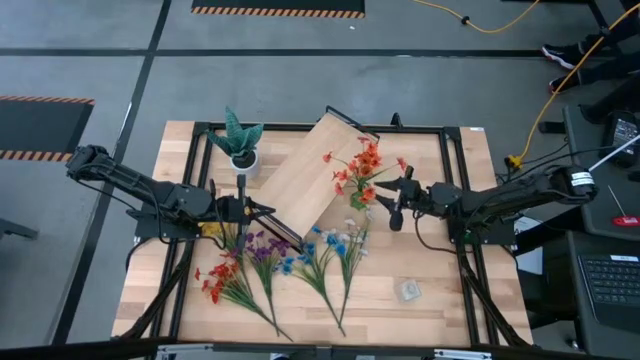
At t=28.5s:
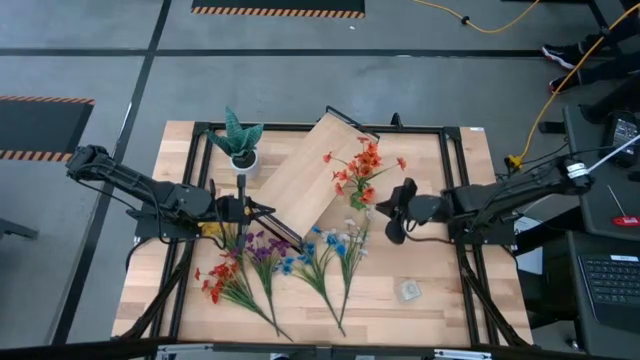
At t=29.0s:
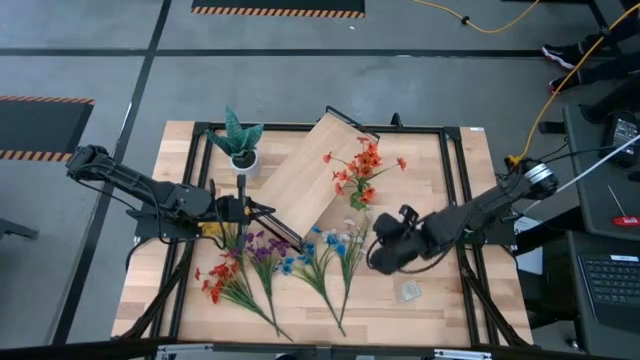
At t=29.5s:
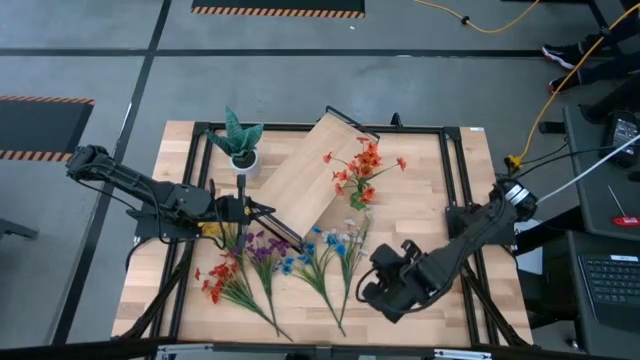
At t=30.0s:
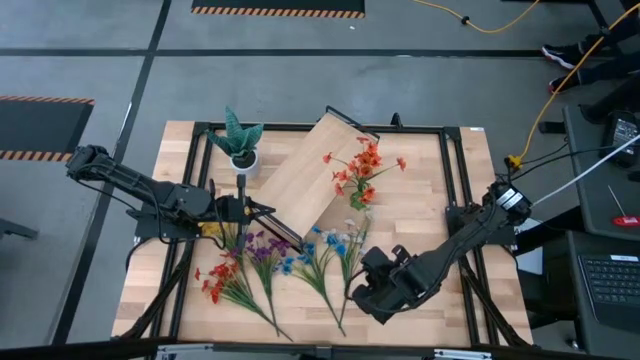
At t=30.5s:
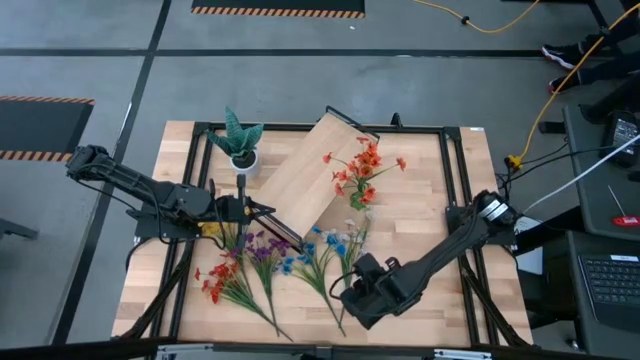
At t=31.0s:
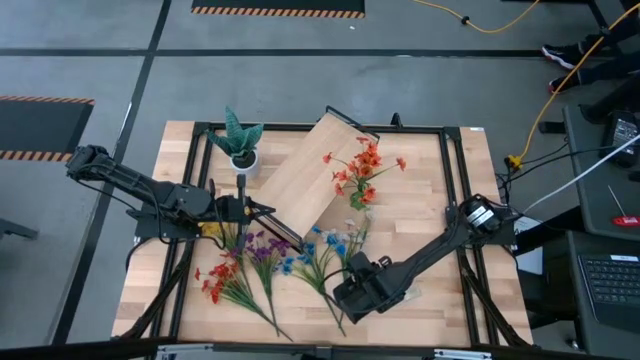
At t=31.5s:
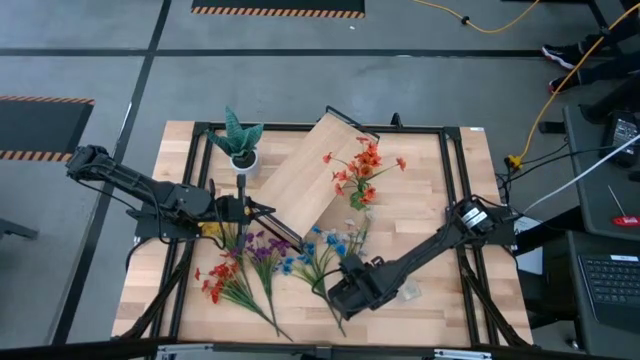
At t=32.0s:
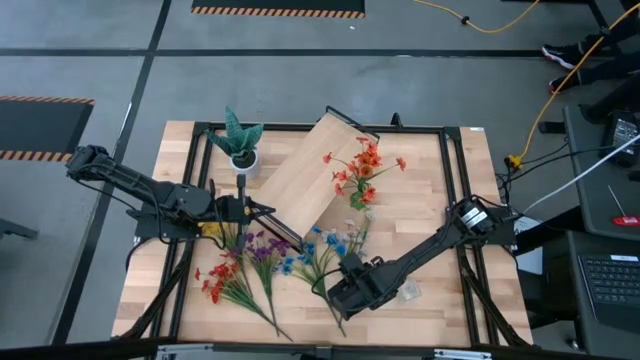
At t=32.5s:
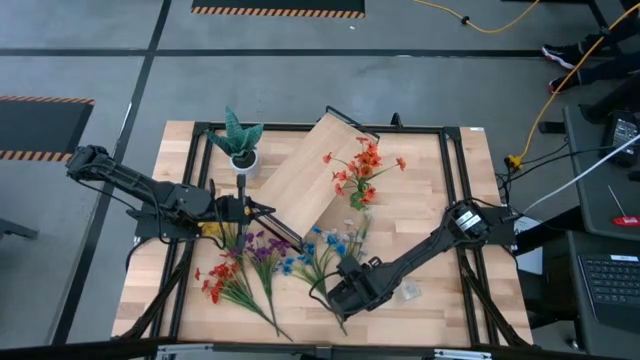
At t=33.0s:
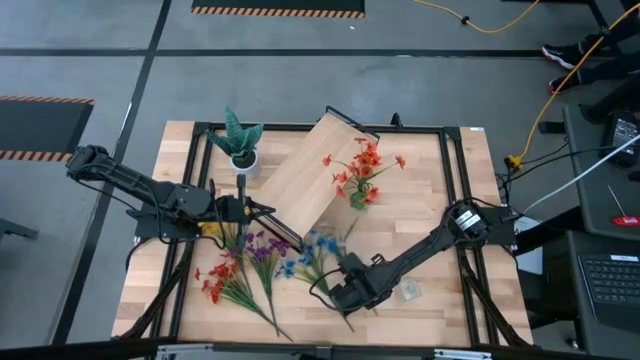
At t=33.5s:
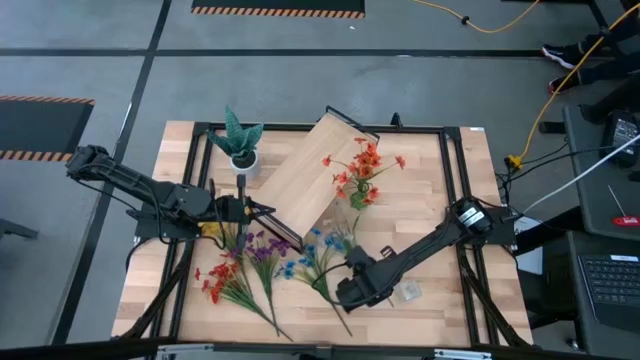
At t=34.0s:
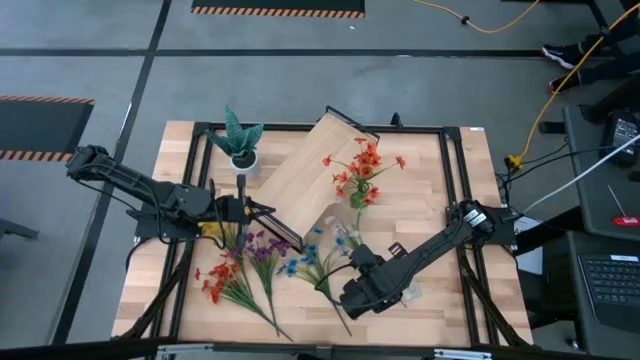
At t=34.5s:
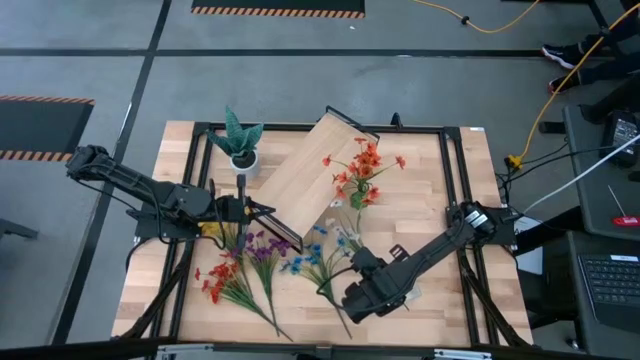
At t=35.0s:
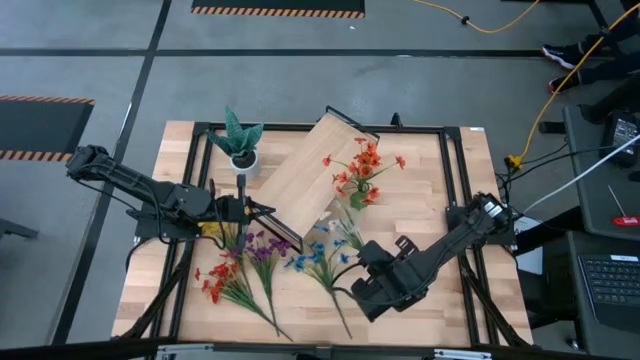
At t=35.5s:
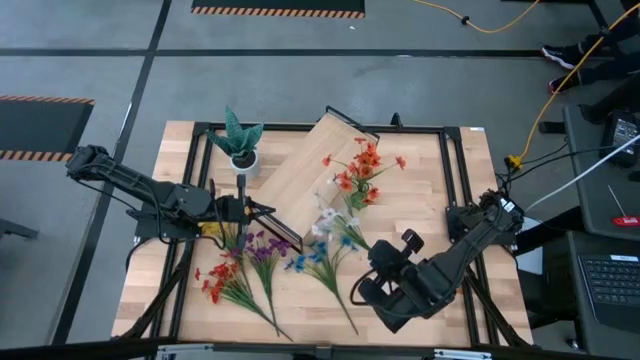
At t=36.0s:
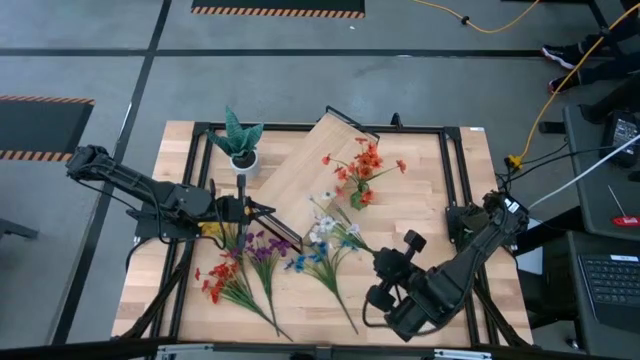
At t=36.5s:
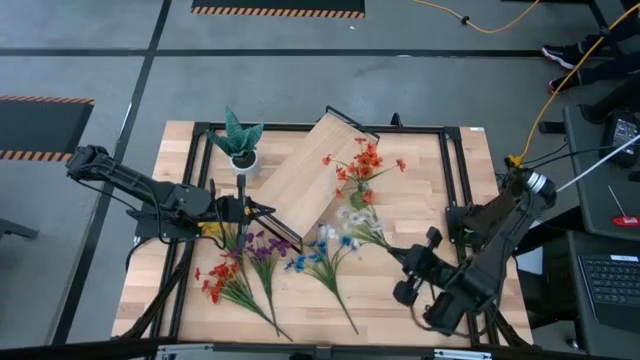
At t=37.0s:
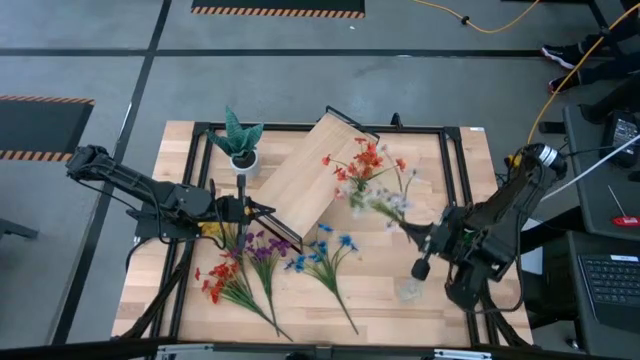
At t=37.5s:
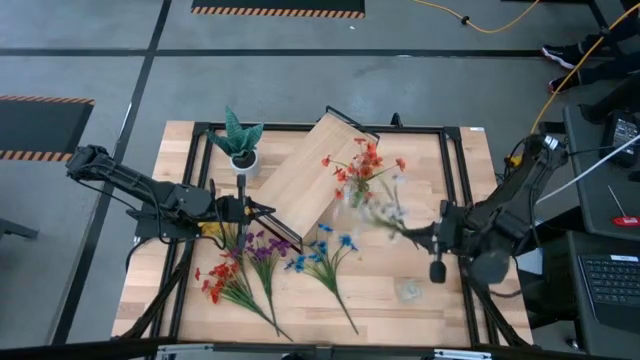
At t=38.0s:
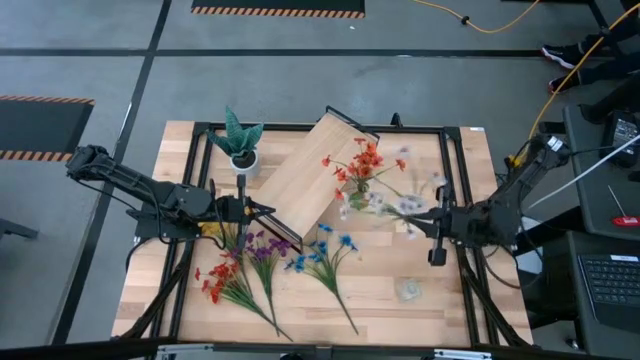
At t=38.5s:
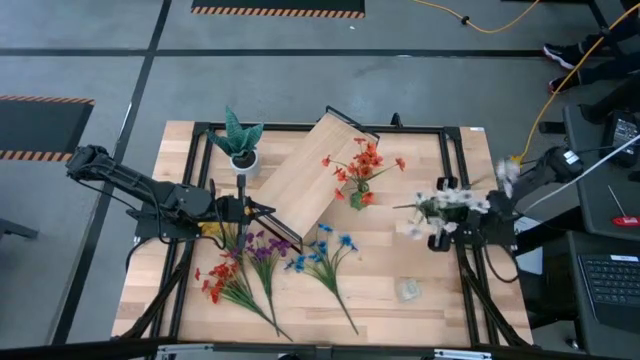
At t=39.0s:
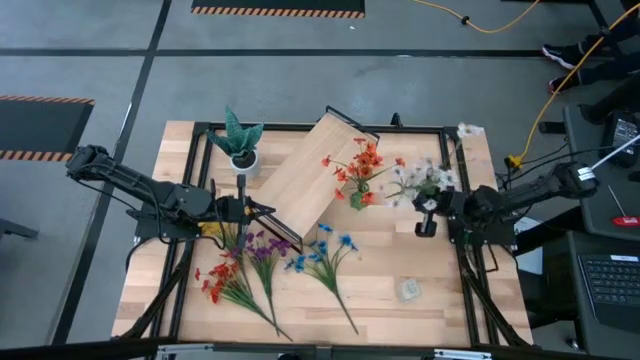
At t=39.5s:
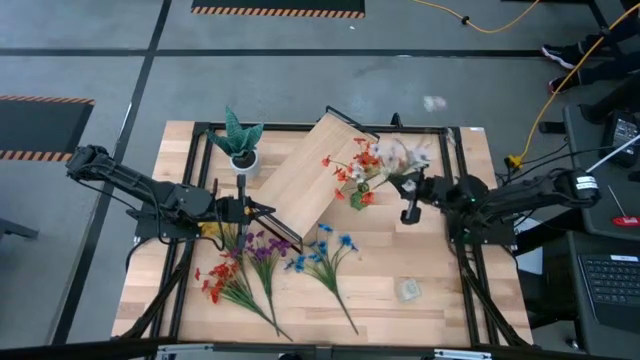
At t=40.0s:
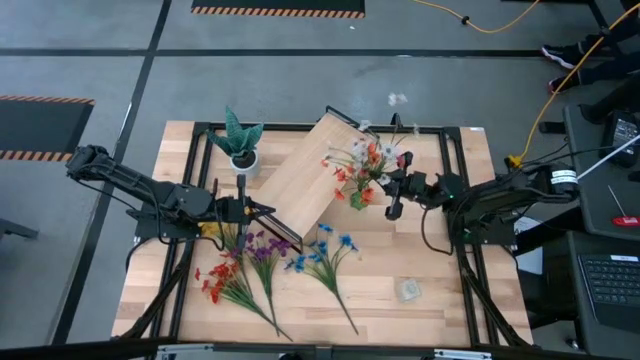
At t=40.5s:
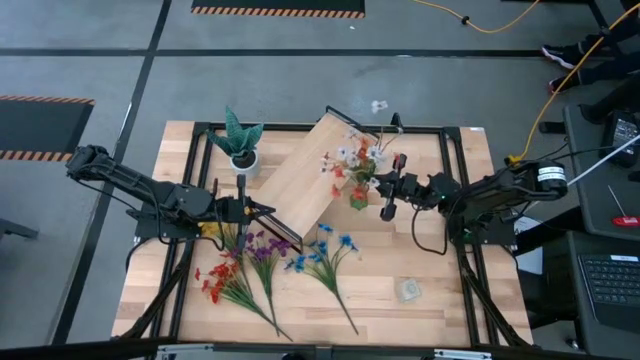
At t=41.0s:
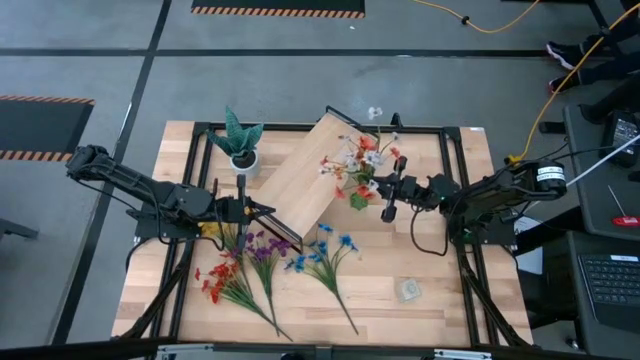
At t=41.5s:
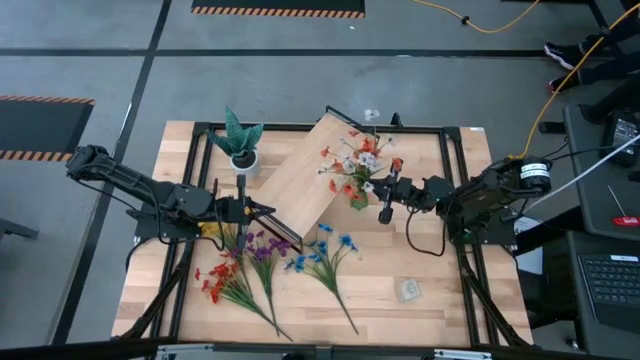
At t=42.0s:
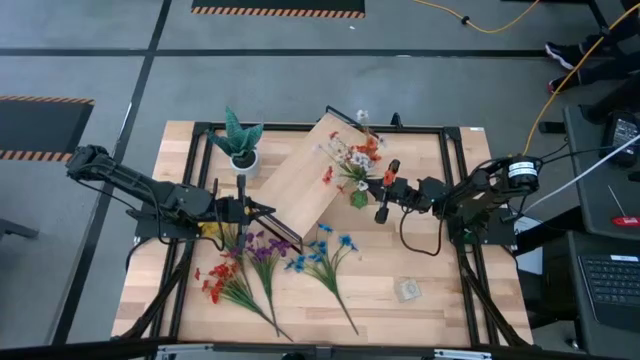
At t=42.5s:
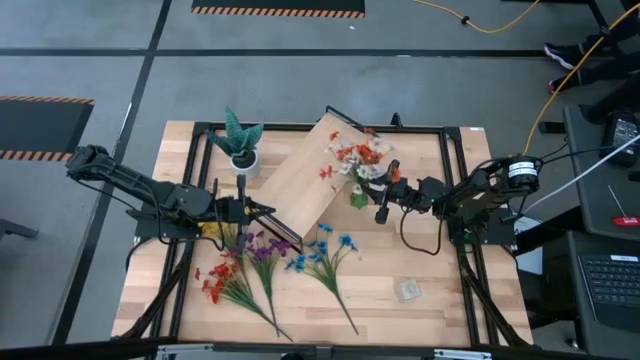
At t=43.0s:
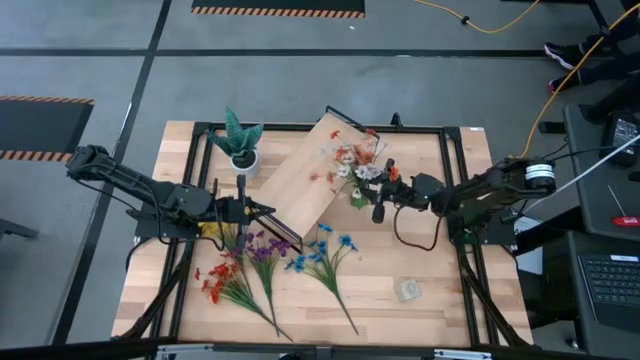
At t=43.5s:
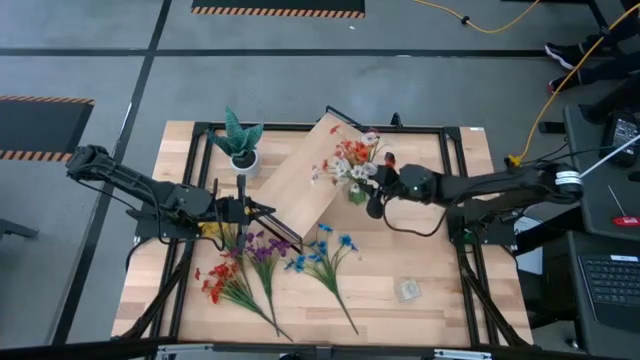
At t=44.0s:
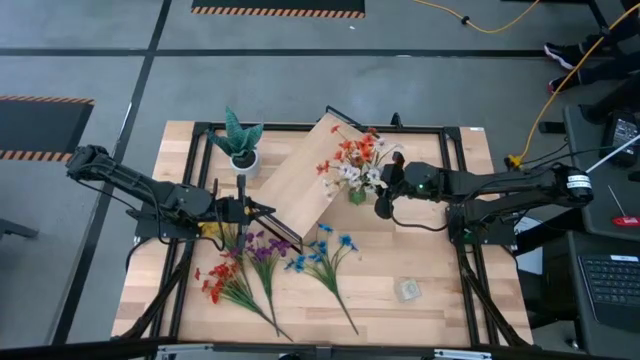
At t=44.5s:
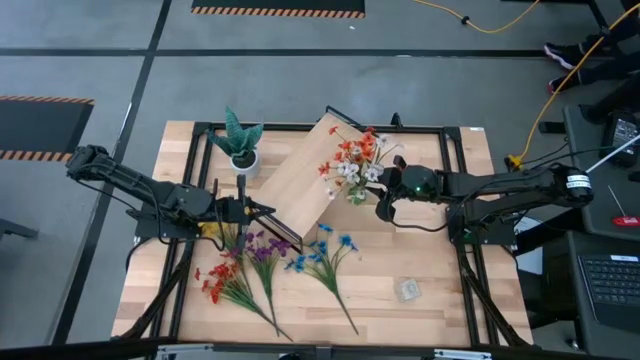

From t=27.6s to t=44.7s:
Task: Pick and place flowers into a vace then onto a shelf
Put the white flowers into the green vase

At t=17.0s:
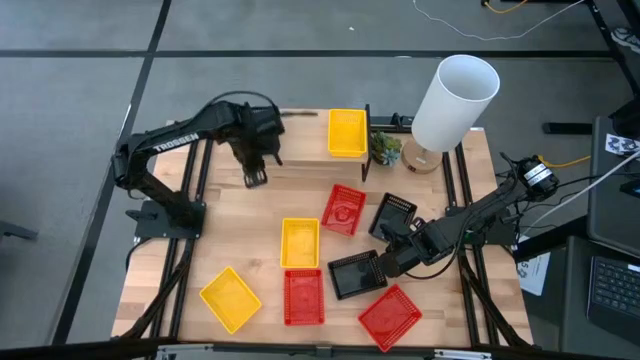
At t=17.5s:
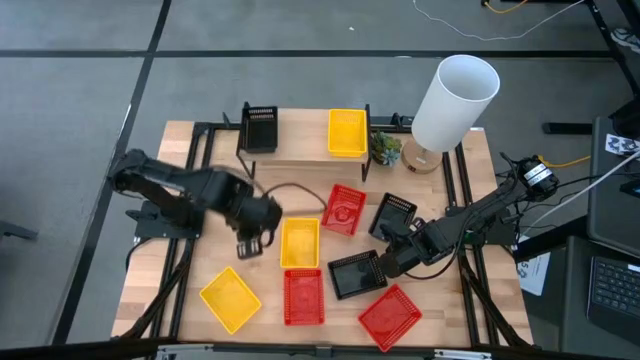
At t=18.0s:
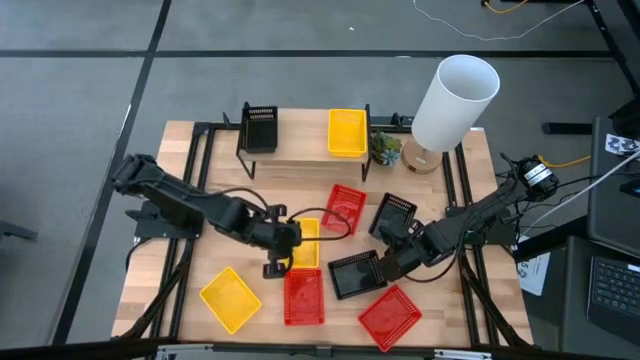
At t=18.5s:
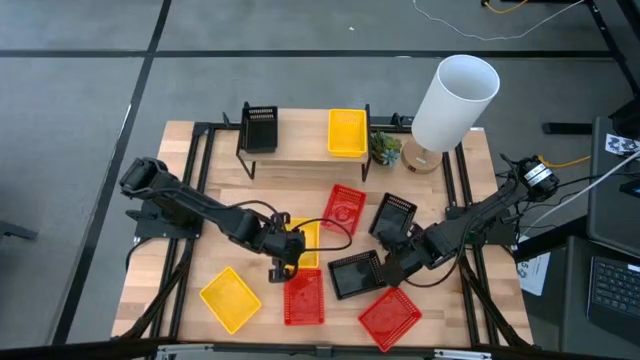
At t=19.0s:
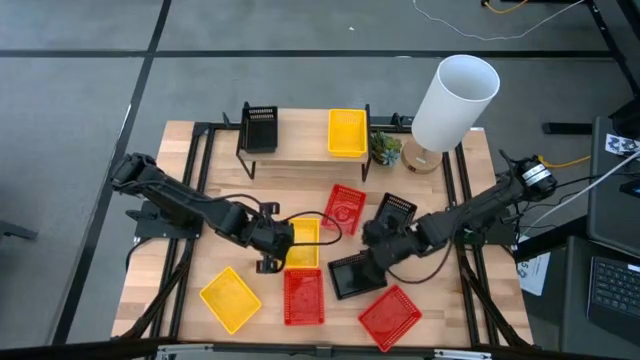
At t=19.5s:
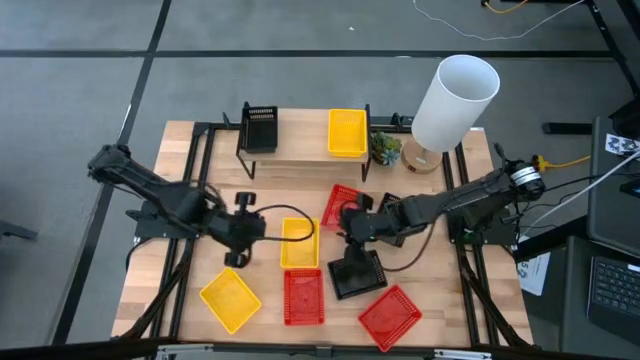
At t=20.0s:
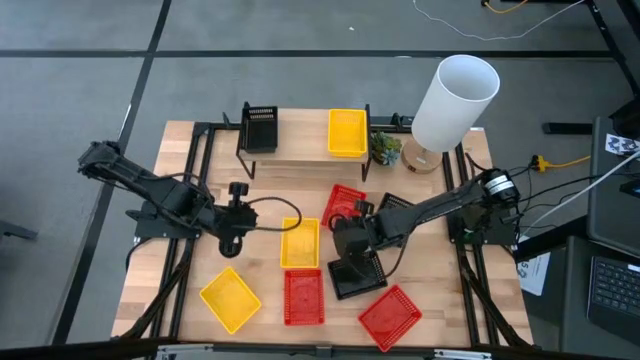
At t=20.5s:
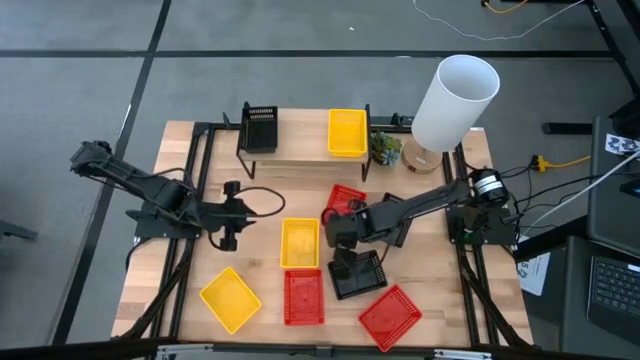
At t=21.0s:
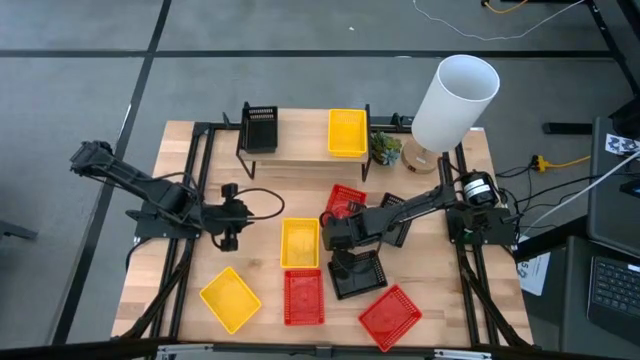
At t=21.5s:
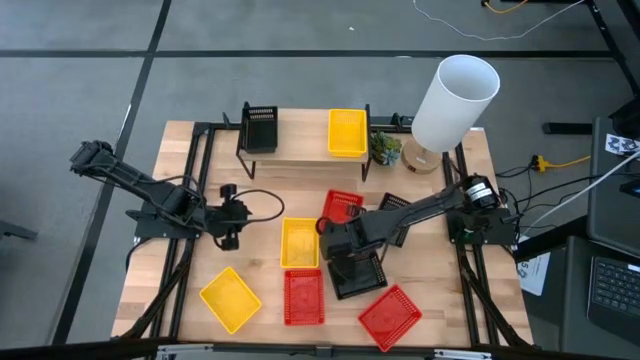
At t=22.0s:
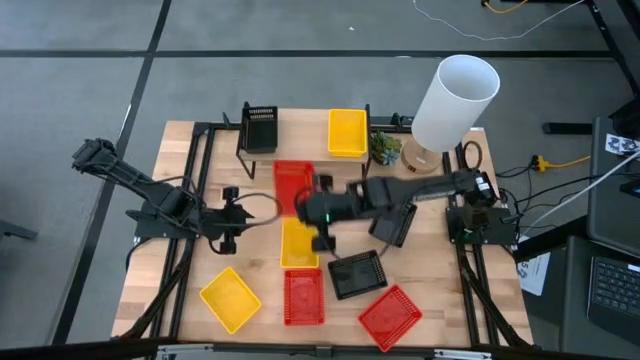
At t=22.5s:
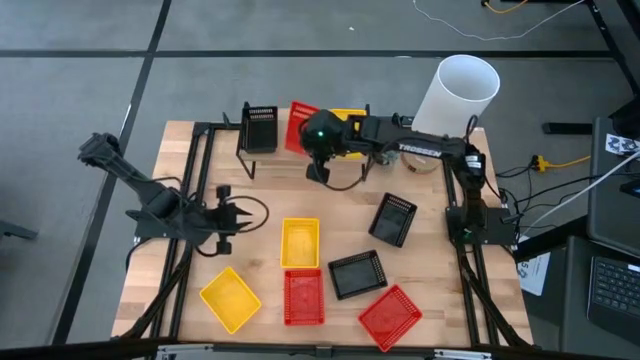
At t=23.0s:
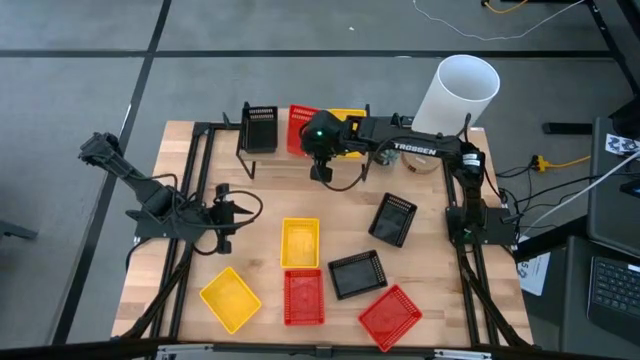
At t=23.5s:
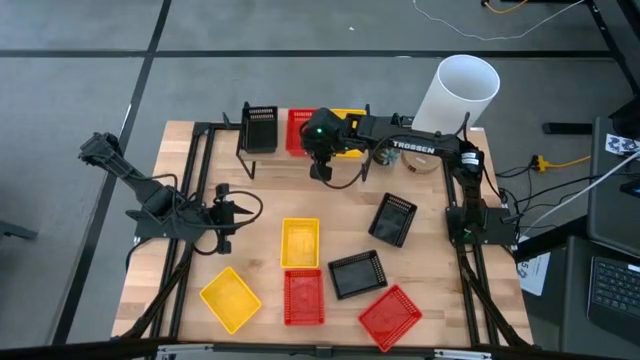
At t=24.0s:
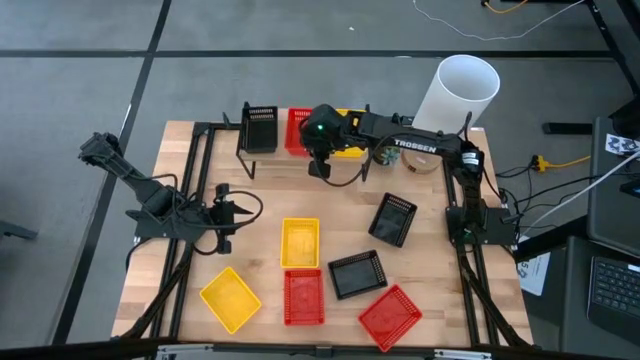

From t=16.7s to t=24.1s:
Task: Stack baskets on shelf by color
Put the top red bin on the shelf
